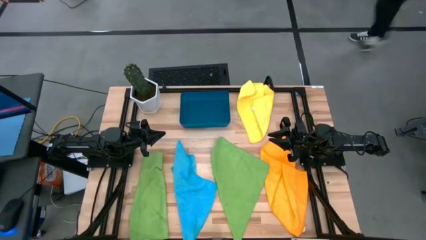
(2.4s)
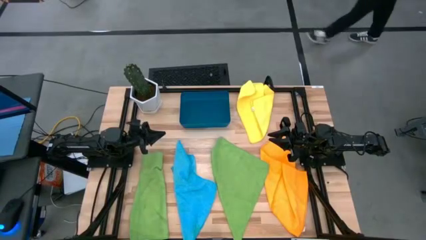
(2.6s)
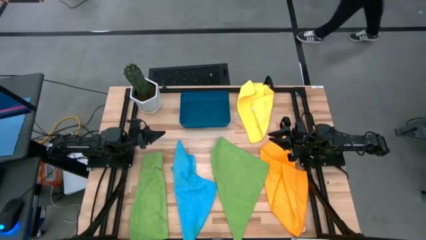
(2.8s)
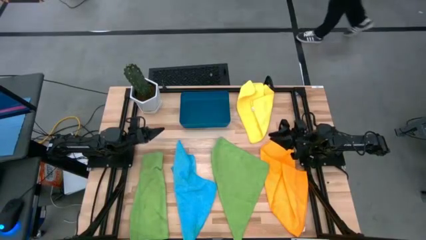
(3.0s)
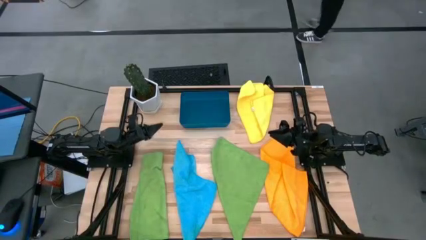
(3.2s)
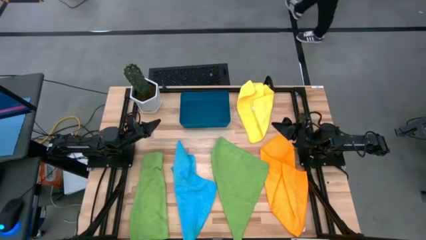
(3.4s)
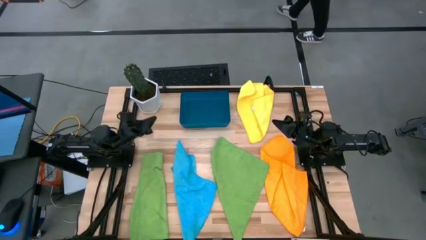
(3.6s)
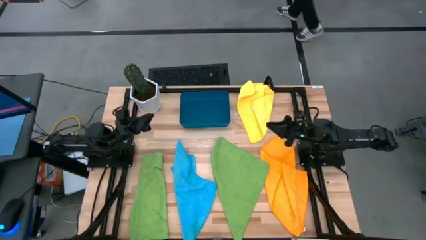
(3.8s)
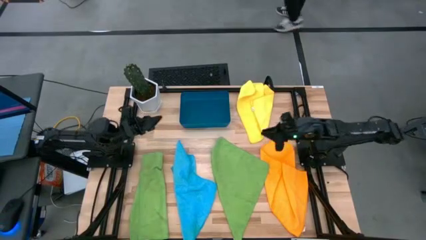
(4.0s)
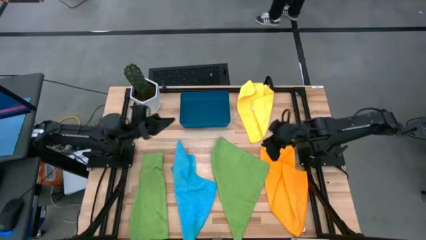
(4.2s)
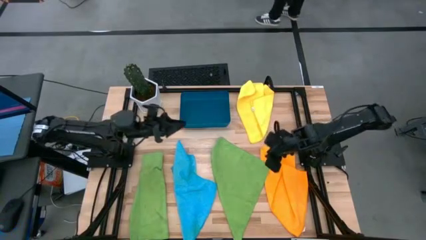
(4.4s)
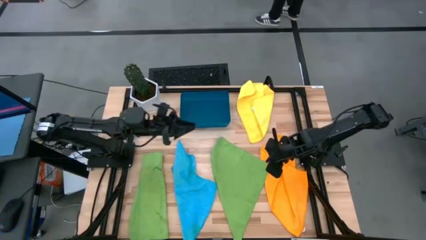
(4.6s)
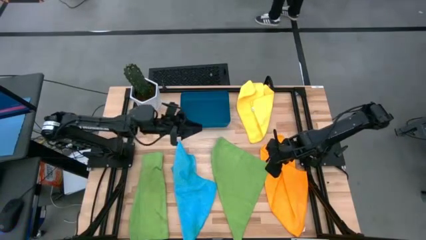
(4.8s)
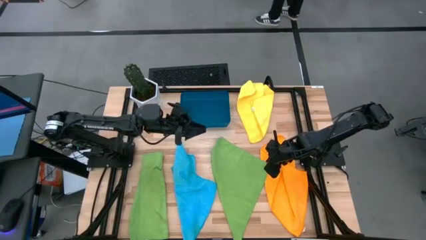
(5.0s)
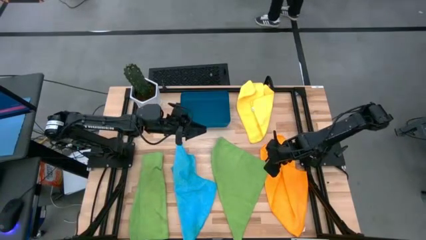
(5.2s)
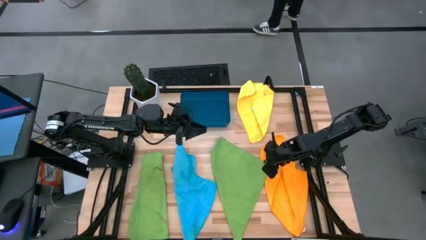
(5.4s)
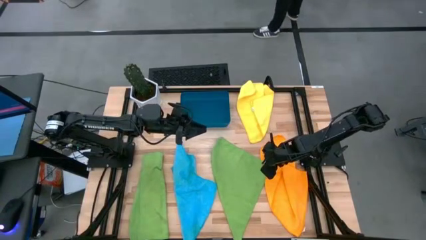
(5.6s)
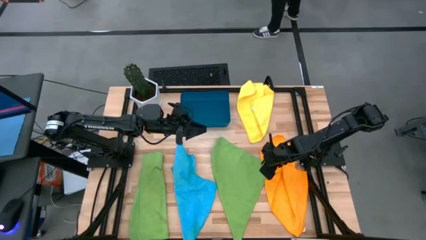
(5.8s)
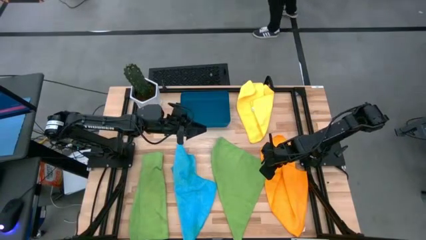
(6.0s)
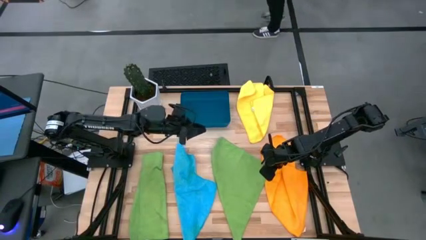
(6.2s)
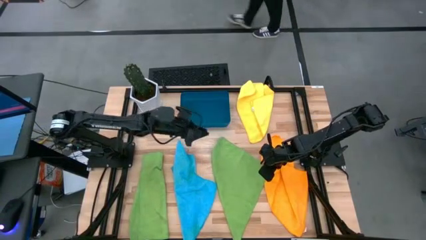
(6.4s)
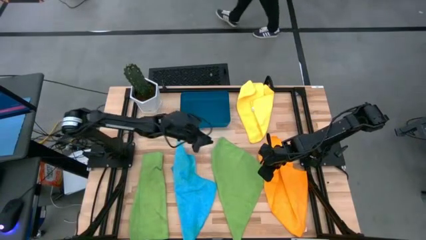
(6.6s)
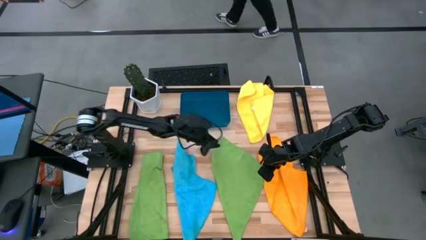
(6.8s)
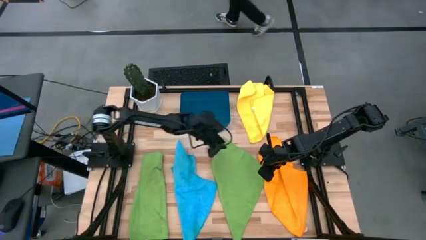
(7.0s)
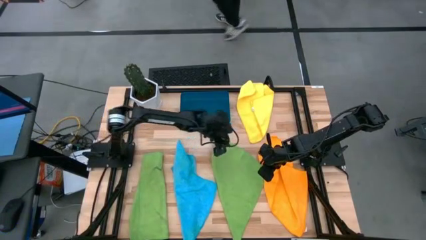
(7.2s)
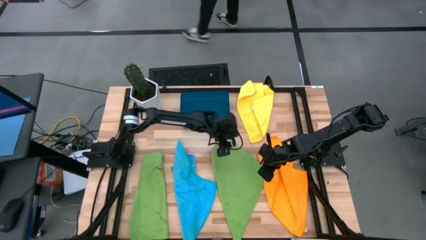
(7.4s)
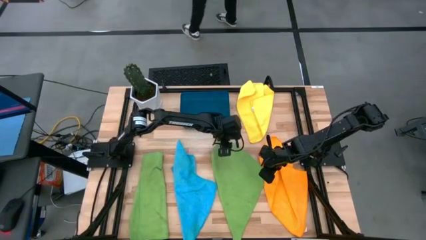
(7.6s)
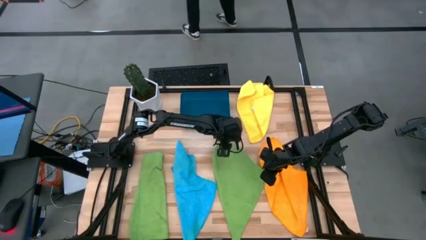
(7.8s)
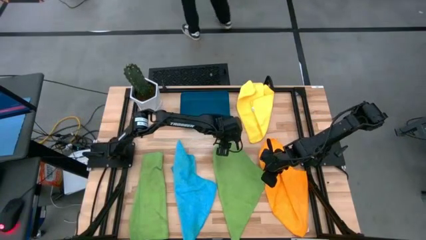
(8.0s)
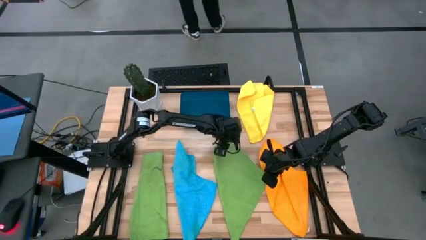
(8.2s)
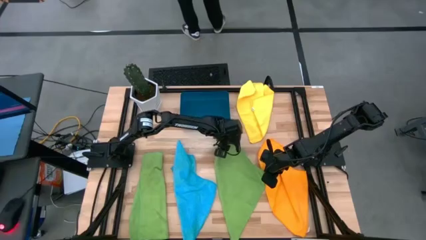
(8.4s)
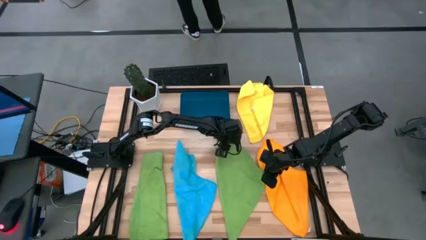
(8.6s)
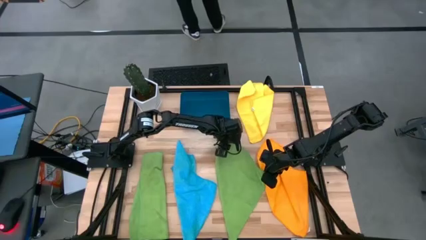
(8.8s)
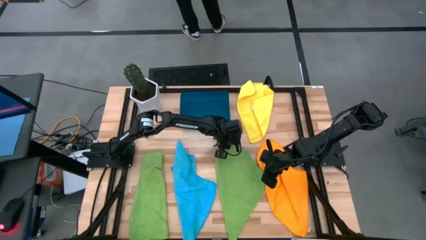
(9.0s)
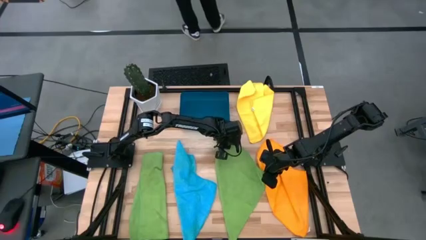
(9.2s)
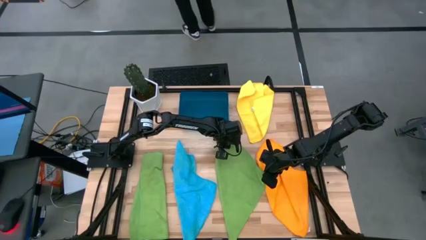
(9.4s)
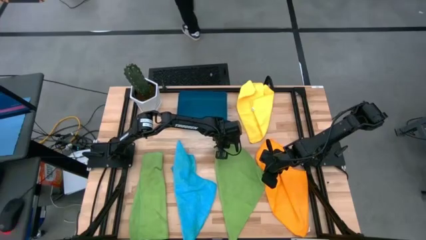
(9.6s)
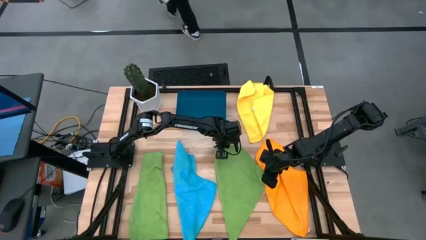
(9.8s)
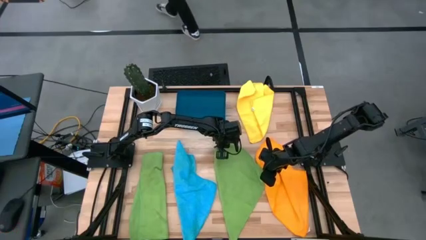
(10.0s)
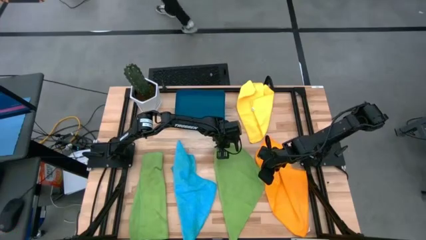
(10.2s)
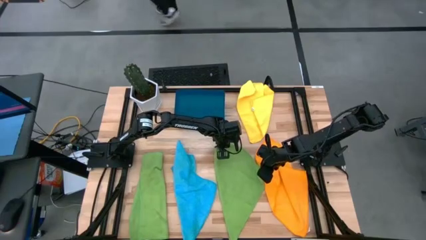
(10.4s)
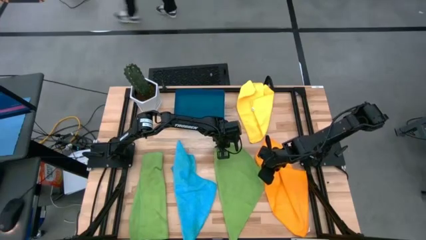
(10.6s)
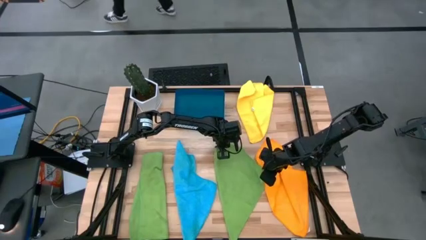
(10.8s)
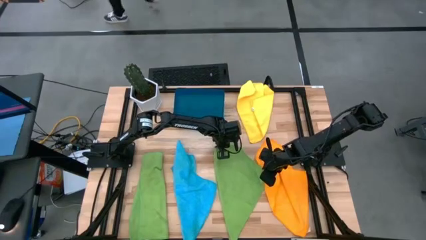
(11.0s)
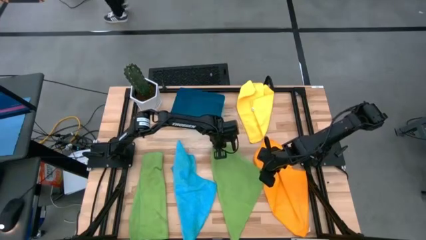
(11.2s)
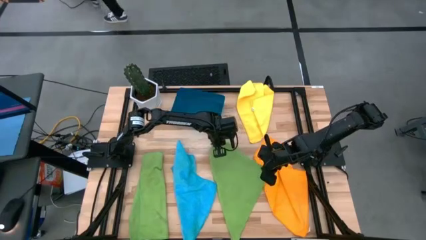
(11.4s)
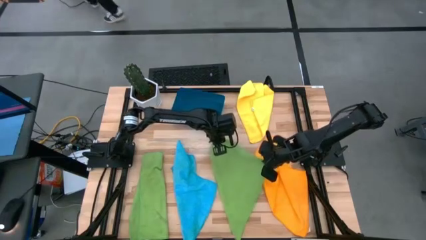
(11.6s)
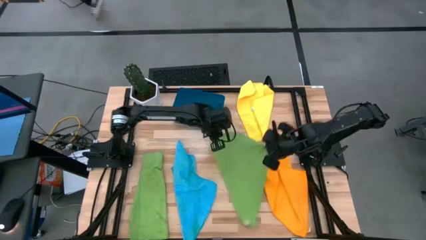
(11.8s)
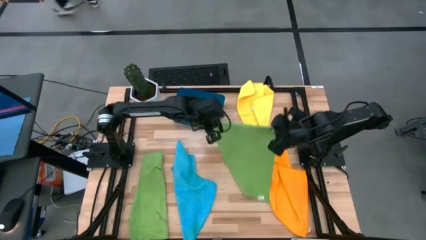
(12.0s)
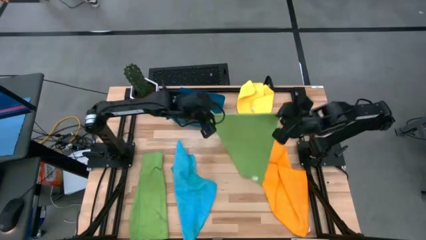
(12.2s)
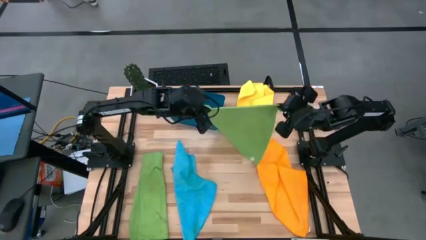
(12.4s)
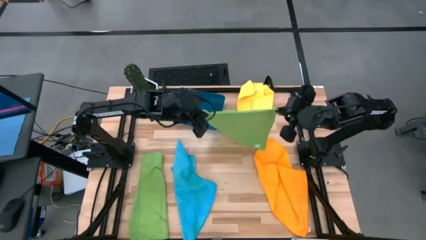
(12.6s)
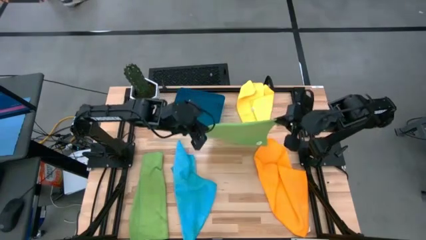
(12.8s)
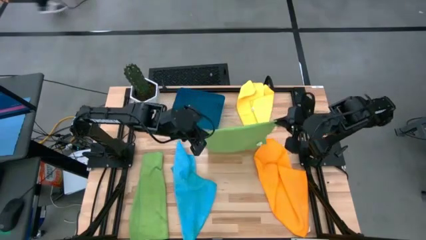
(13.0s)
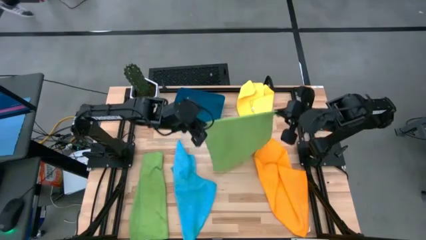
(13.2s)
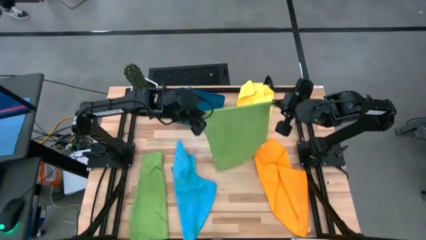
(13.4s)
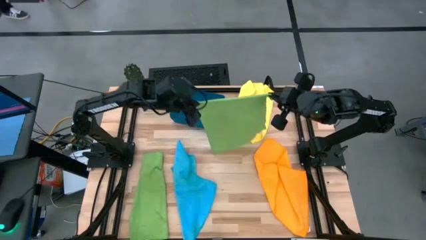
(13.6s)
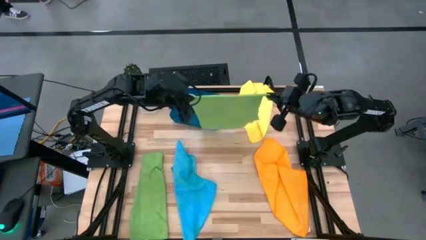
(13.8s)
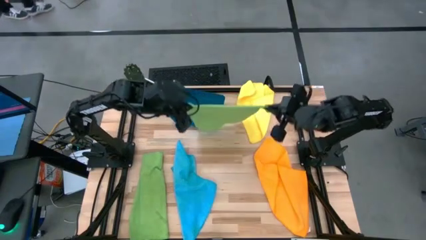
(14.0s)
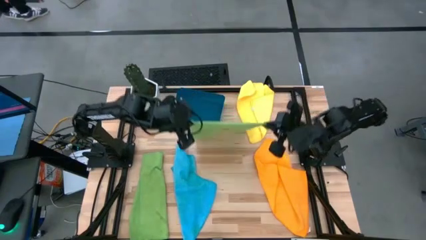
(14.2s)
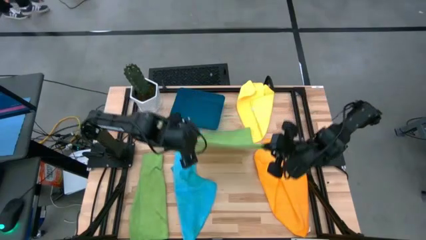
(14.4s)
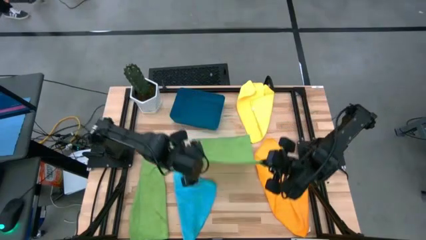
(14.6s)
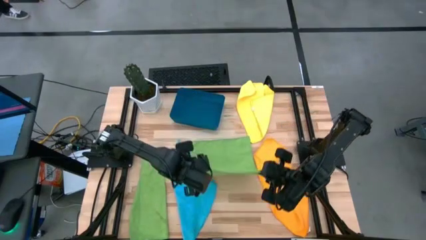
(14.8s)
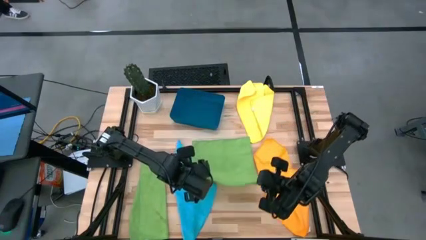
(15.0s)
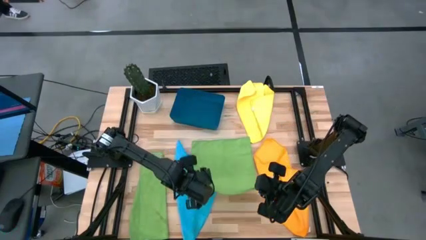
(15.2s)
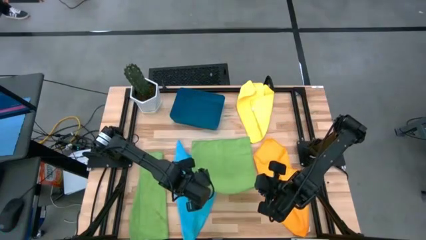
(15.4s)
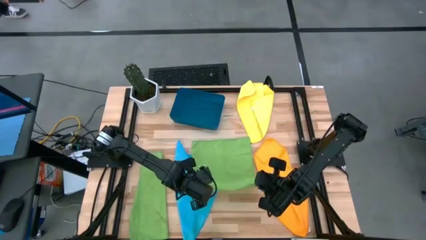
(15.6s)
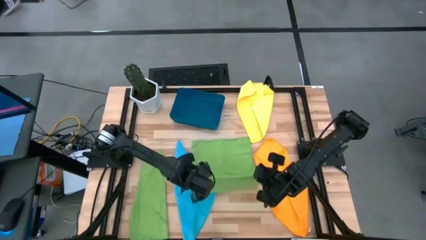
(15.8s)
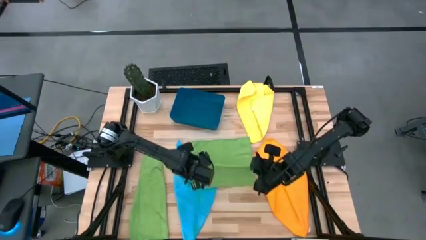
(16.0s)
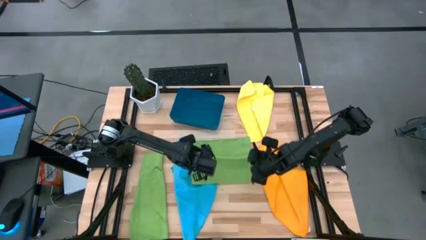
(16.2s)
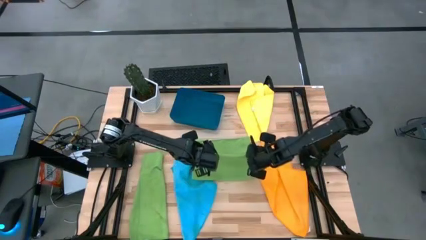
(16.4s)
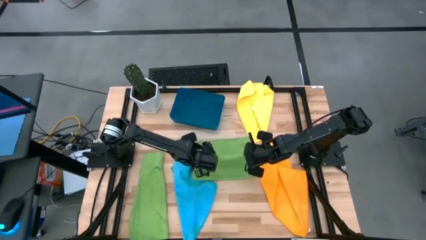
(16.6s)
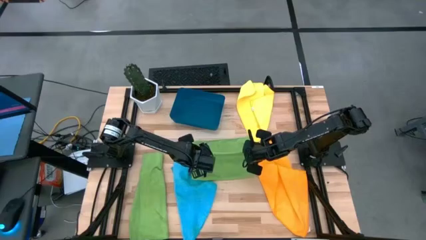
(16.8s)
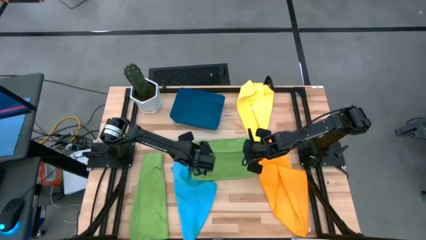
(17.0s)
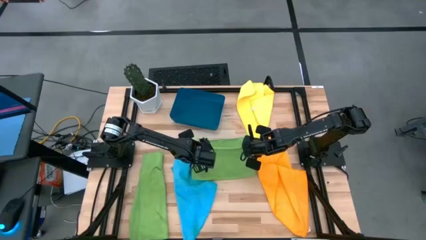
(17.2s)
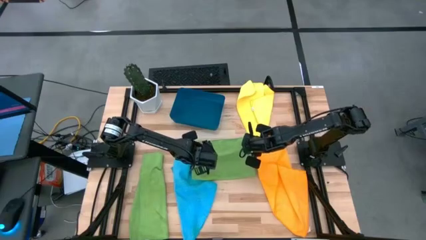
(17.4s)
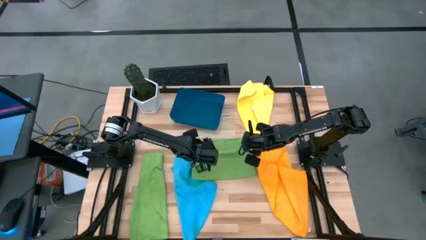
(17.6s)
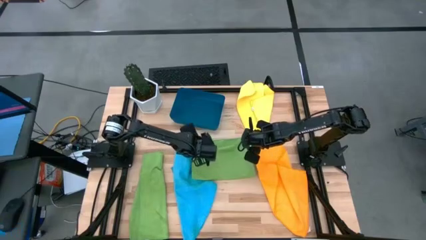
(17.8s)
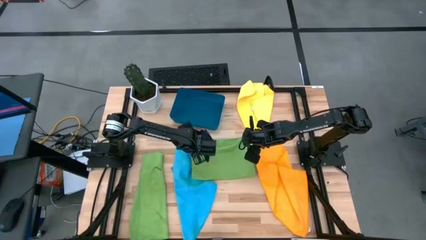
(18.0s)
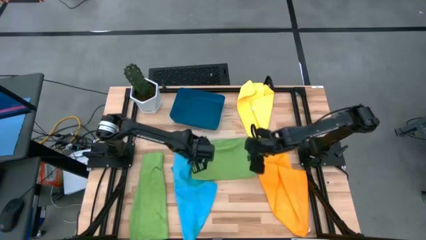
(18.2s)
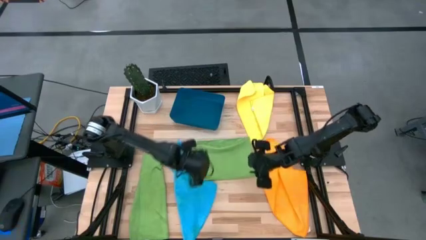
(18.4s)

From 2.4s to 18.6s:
Task: Fold microfiber towels
Fold the right green towel
